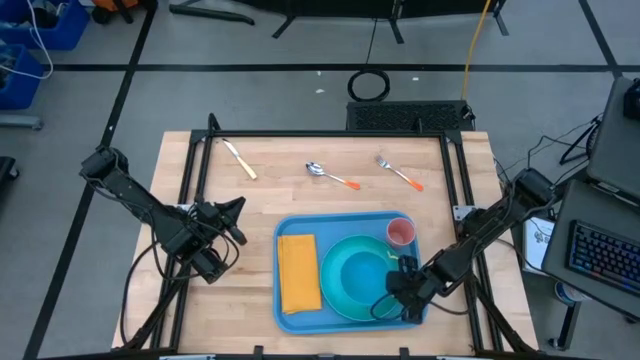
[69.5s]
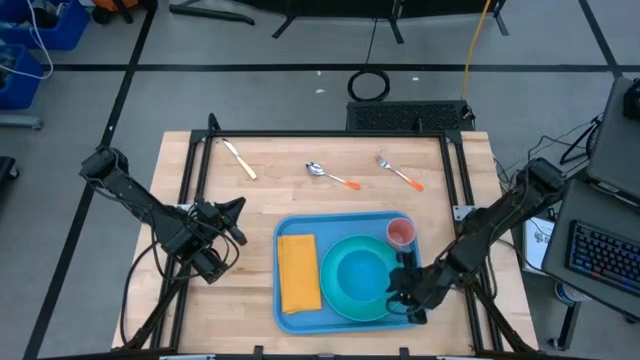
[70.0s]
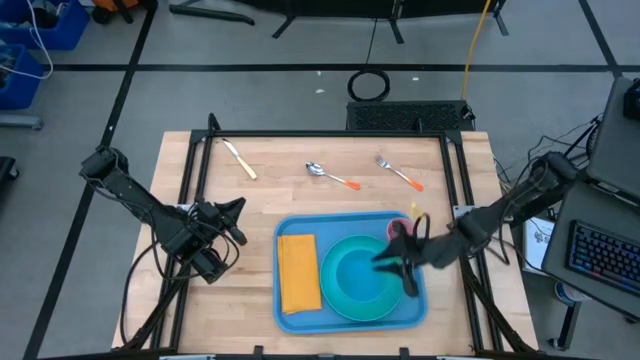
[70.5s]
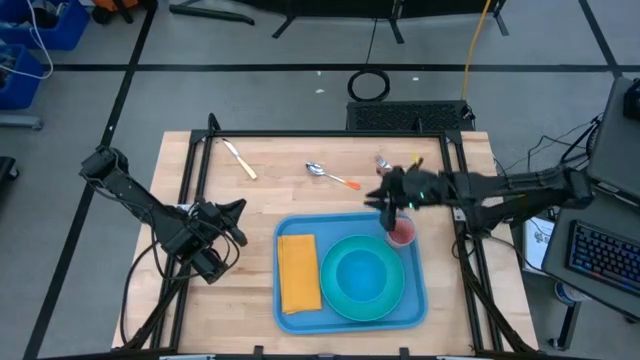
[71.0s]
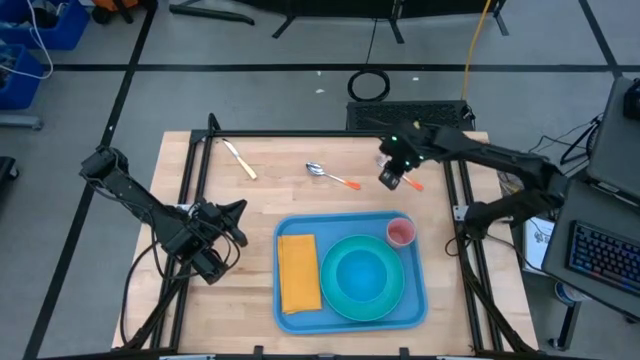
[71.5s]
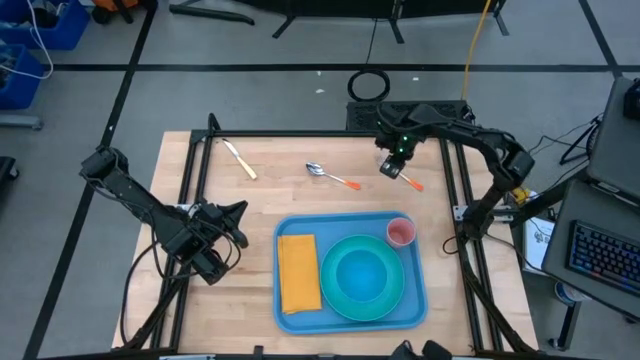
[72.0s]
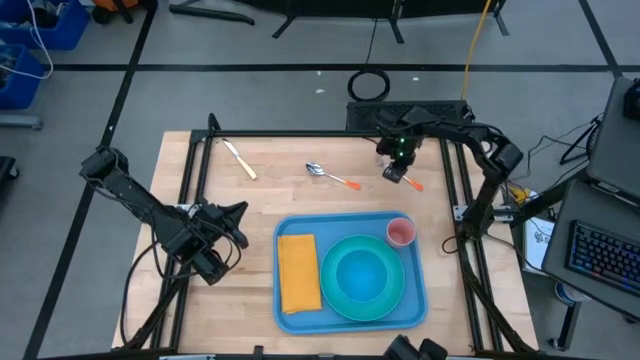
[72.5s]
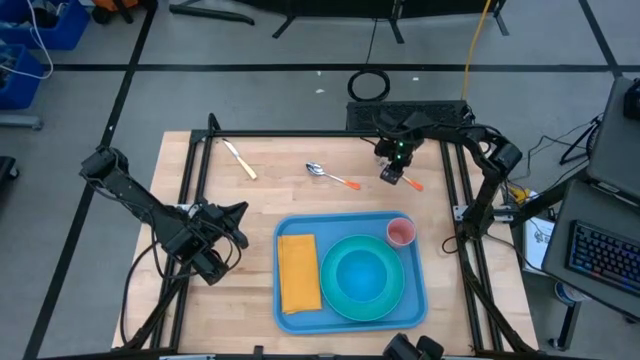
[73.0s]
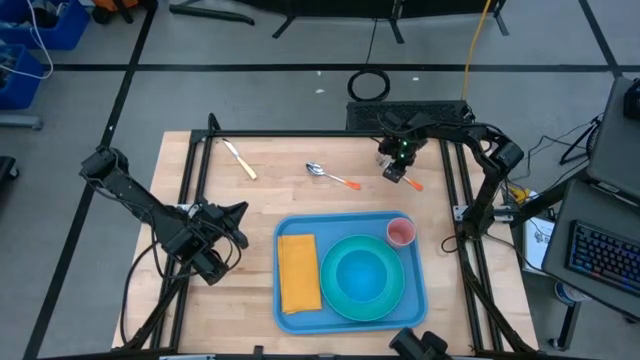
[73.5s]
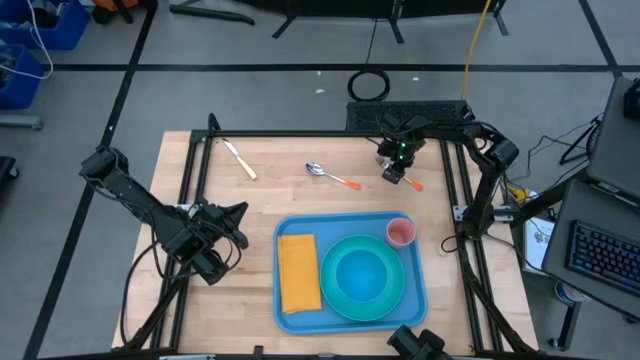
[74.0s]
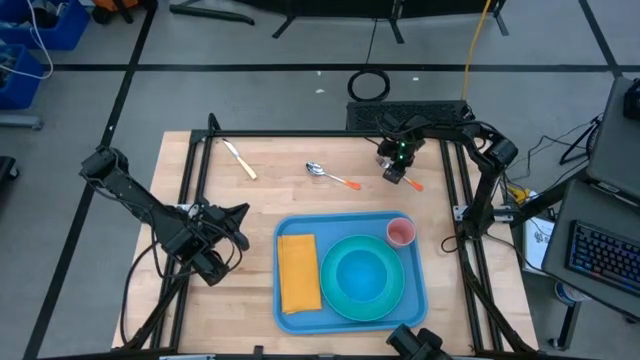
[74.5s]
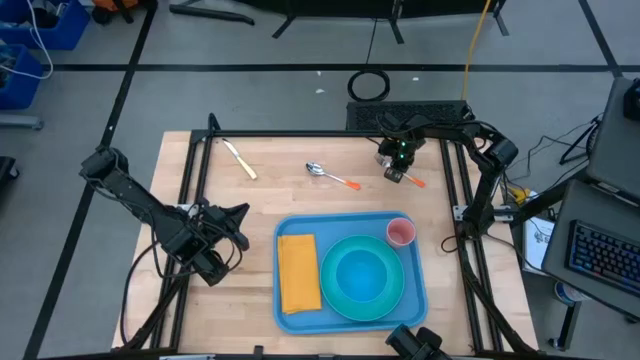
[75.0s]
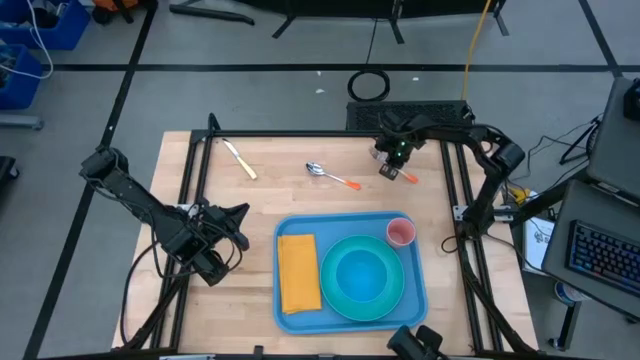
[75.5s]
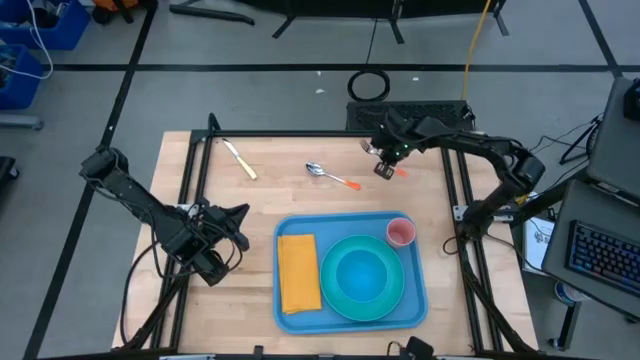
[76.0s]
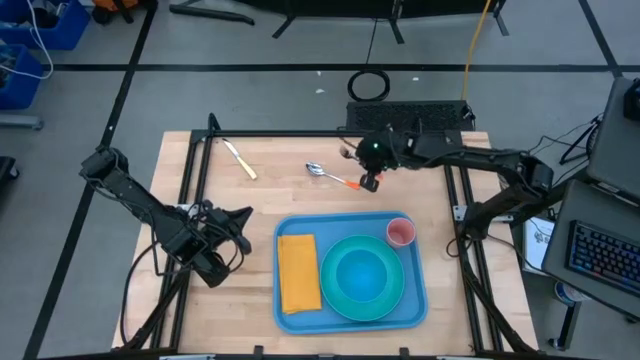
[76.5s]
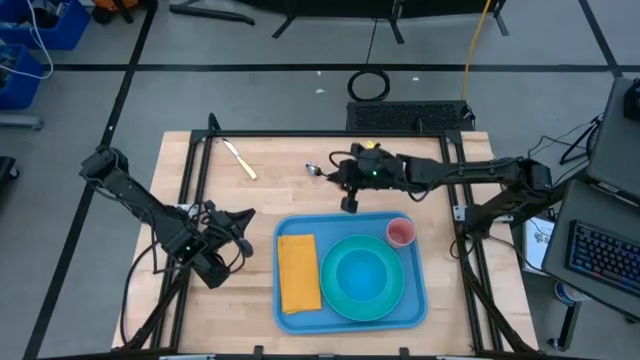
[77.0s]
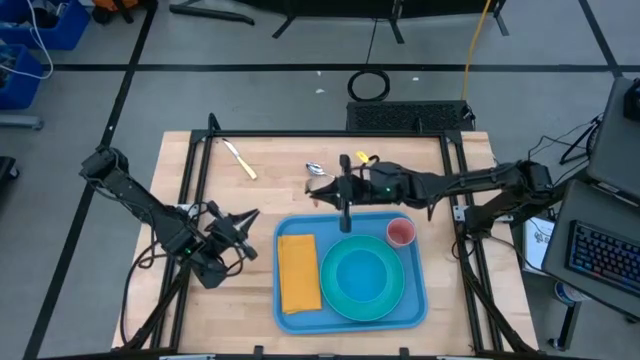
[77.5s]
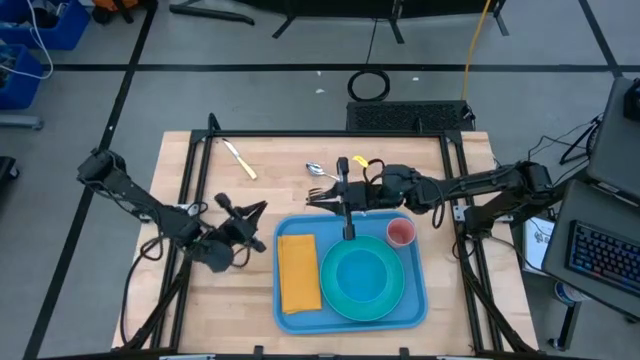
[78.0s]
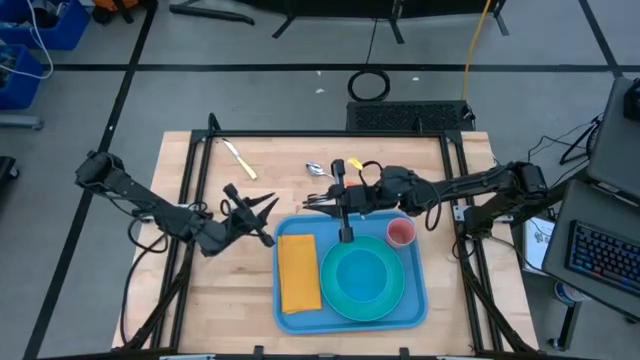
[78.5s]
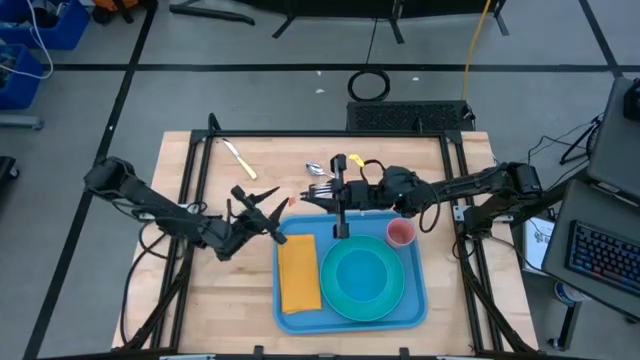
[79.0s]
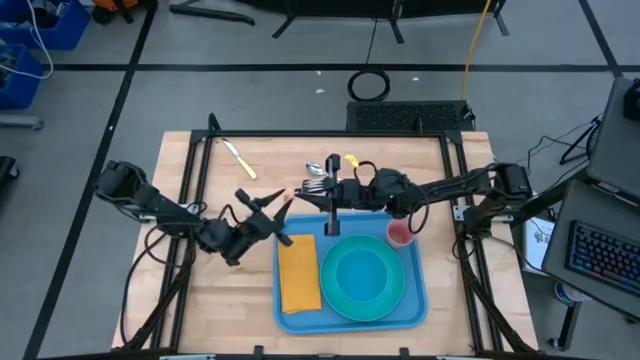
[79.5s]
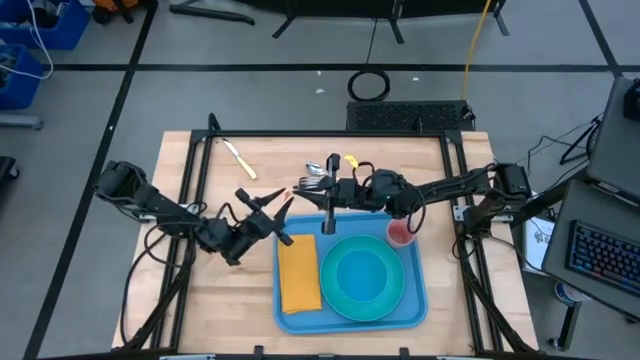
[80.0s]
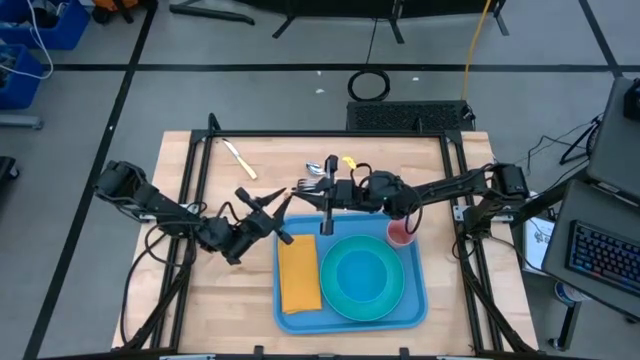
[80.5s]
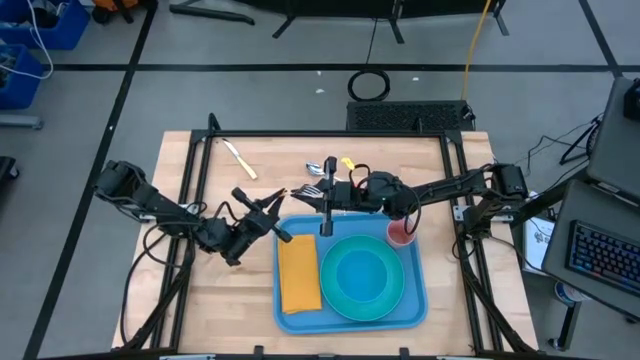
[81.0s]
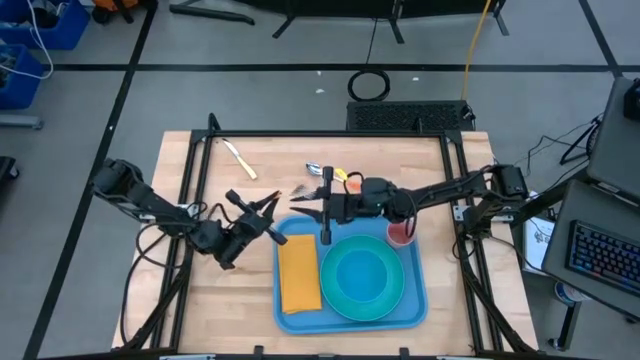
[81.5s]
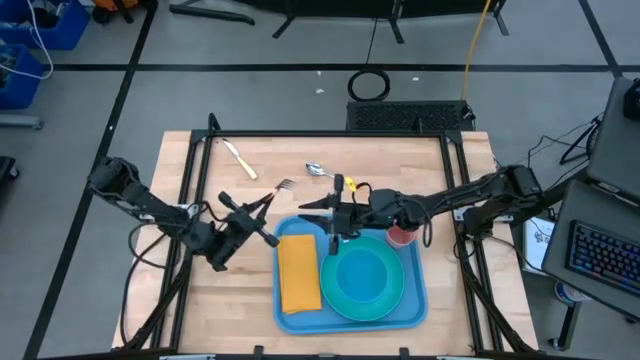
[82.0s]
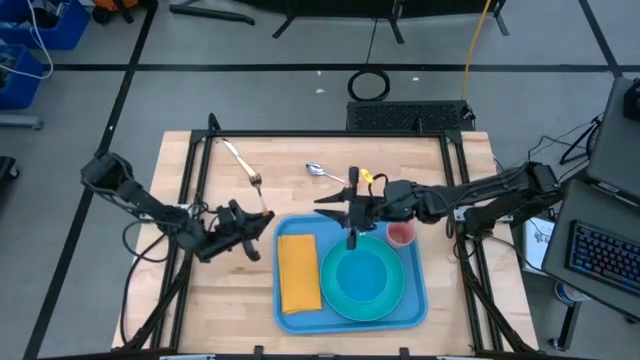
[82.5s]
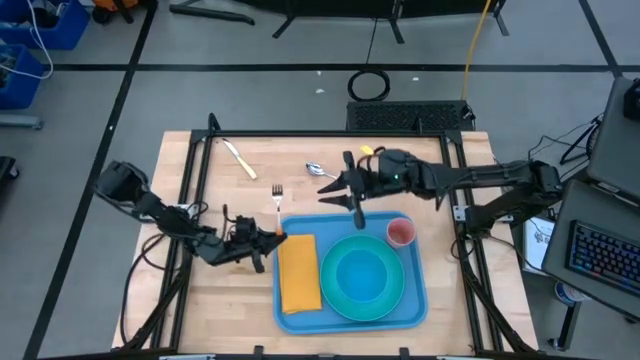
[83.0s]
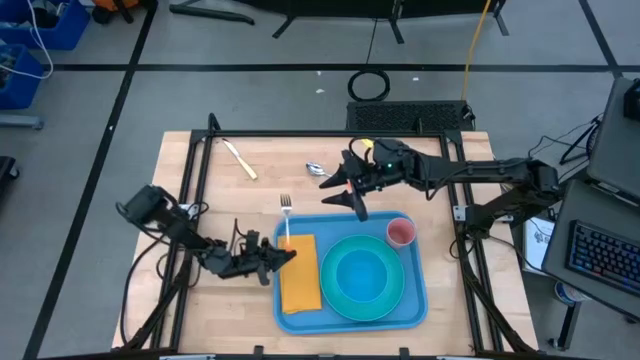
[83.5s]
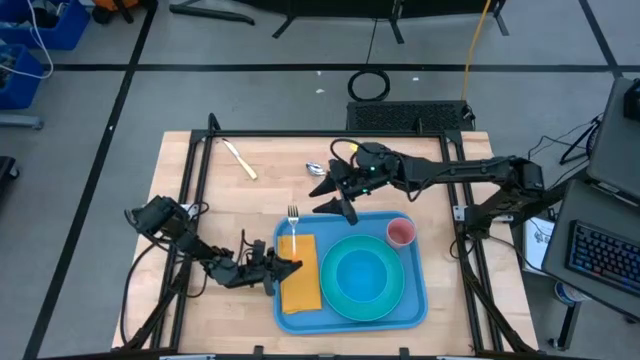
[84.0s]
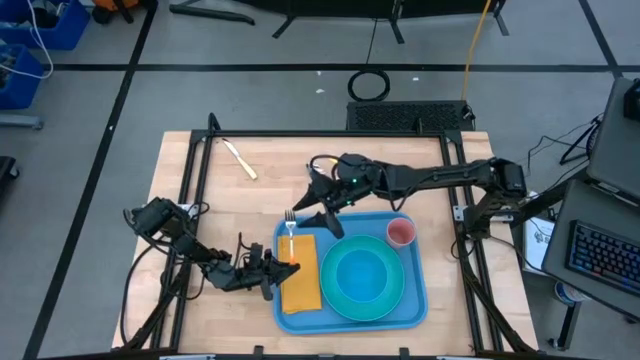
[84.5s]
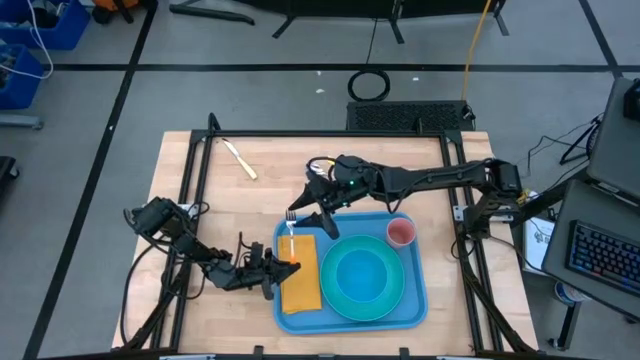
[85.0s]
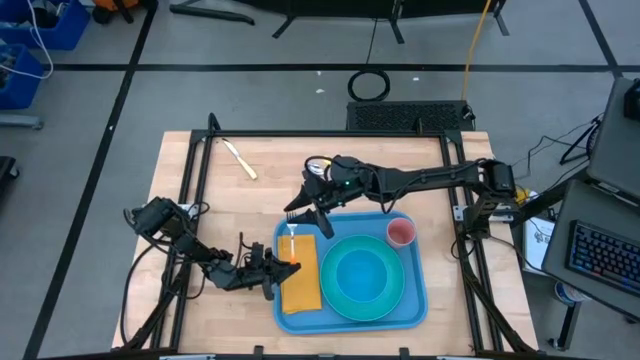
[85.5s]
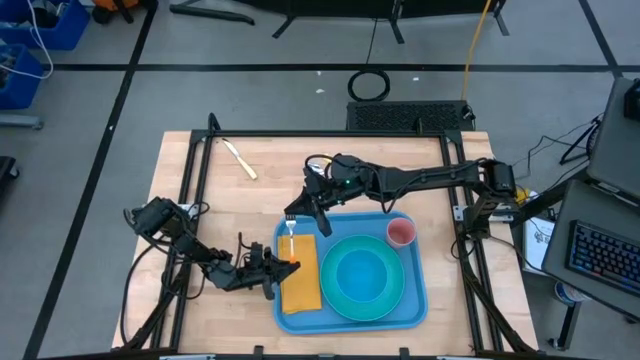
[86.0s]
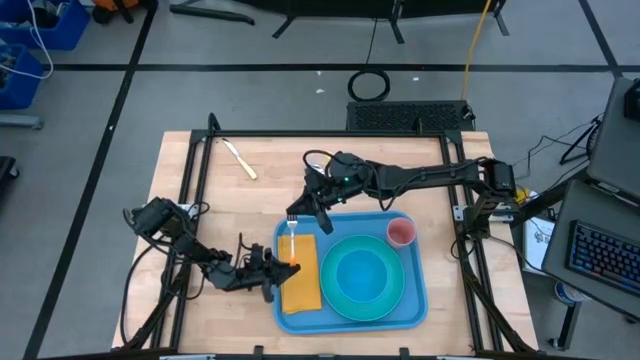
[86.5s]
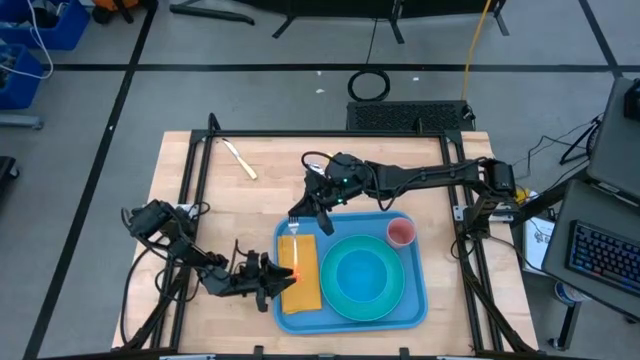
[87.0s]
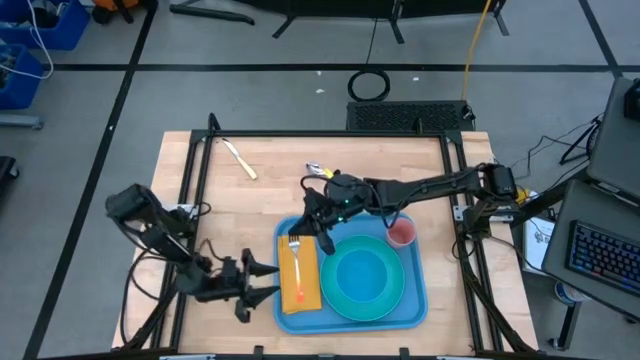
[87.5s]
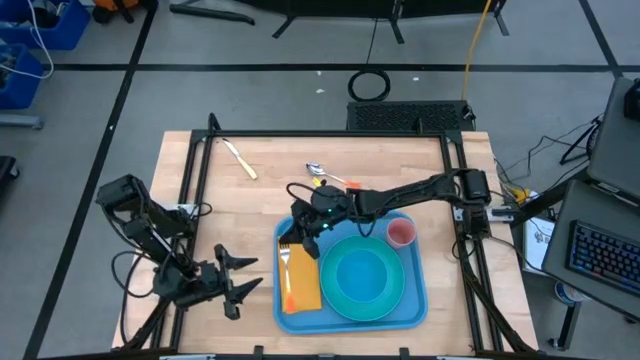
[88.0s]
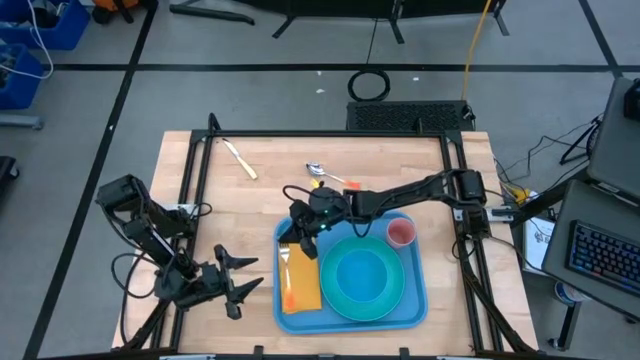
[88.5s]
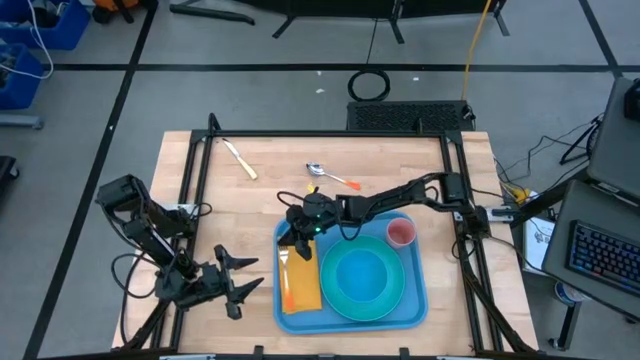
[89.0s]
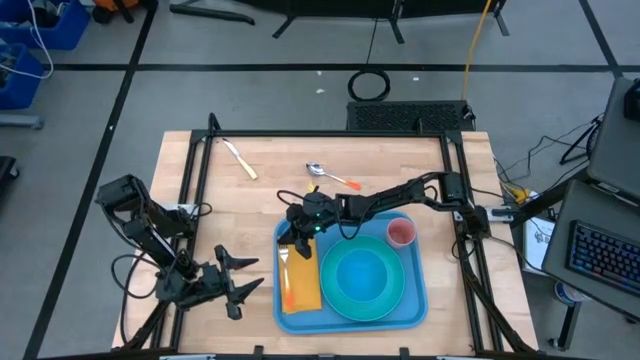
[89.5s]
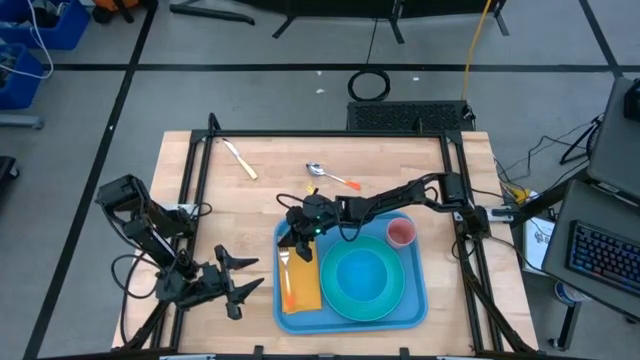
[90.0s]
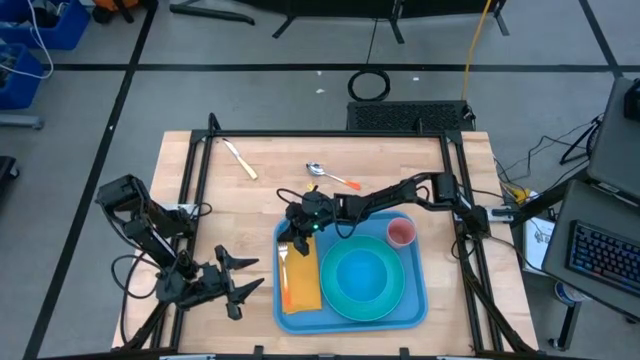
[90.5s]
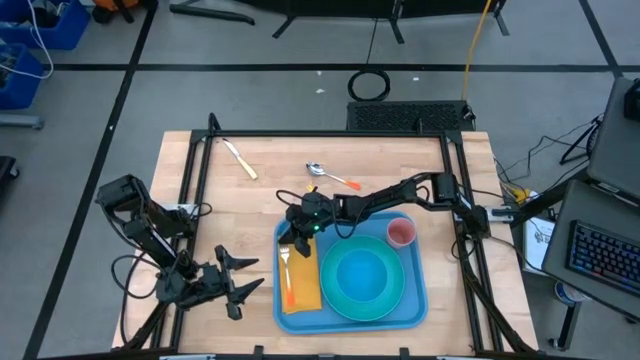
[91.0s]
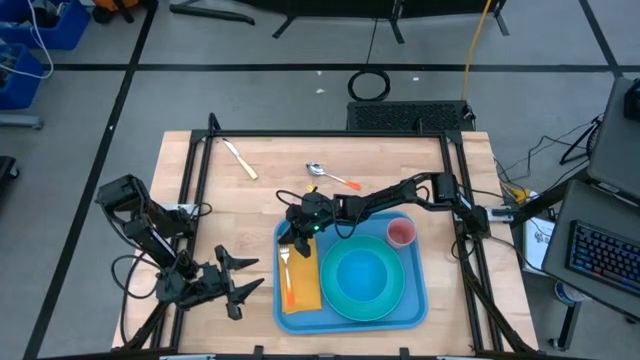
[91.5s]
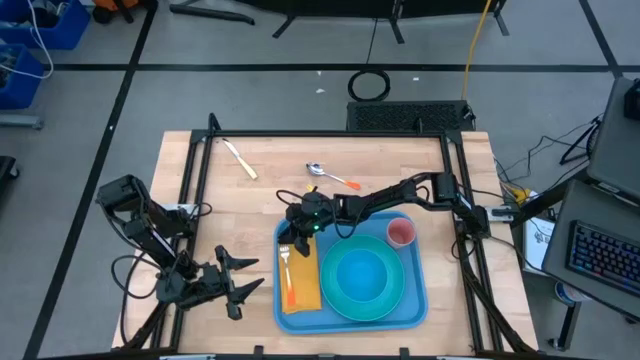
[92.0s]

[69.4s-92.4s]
Task: Set up tray
Put the orange fork on the yellow napkin
